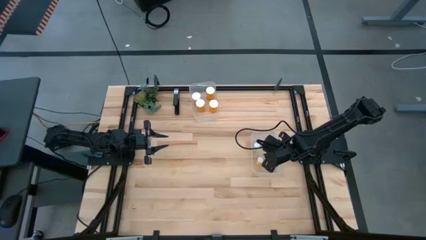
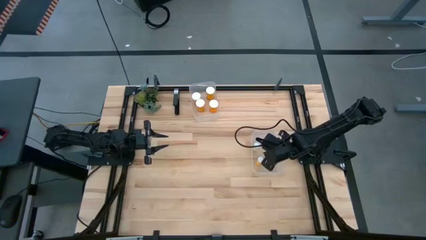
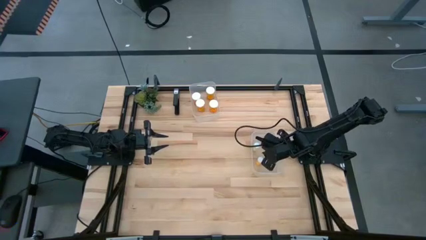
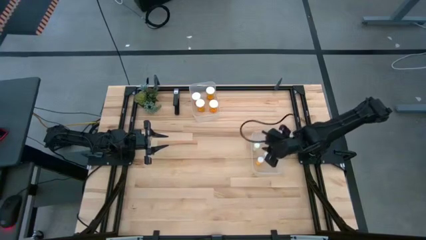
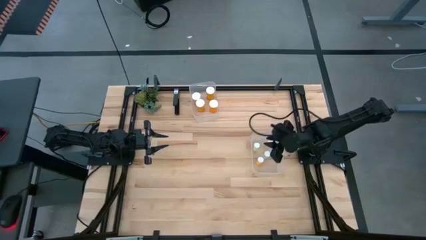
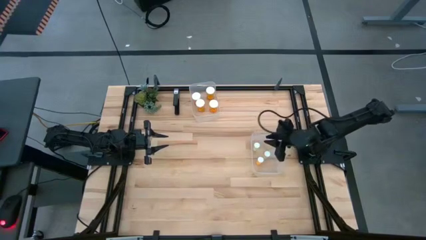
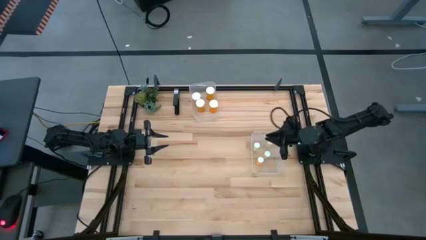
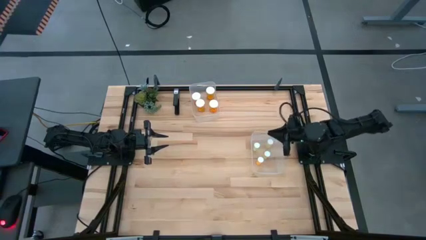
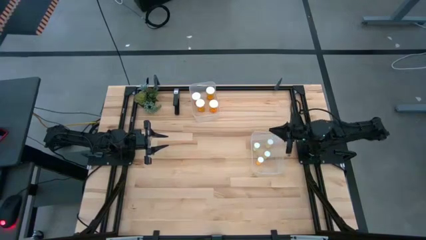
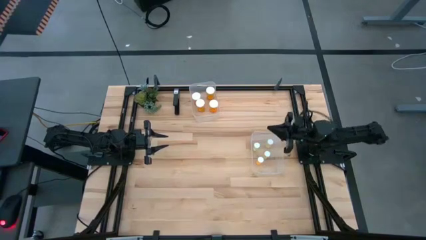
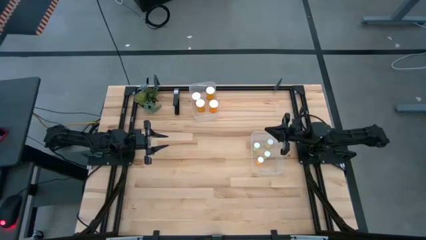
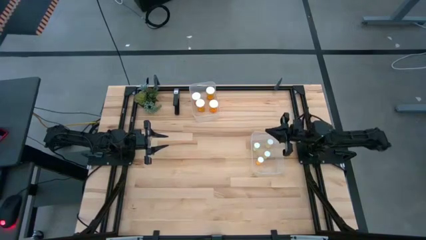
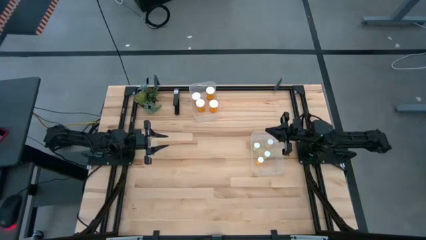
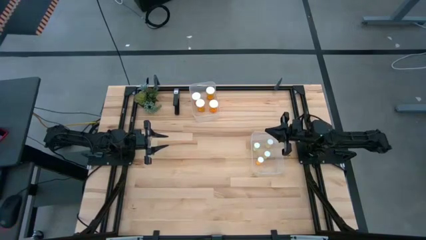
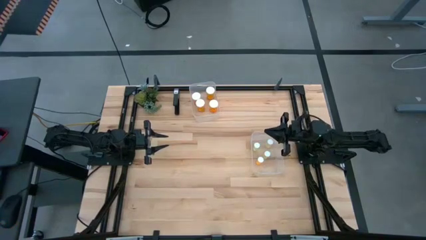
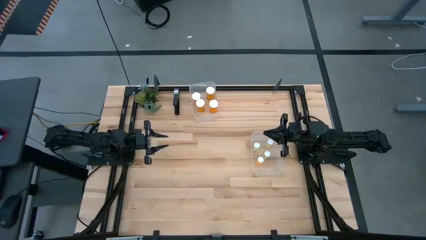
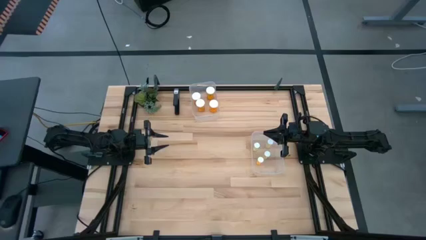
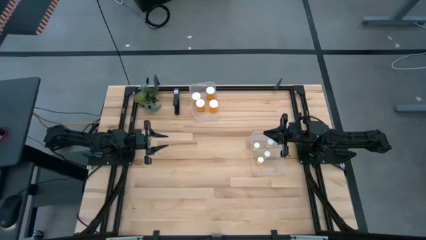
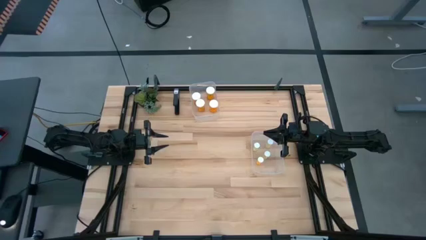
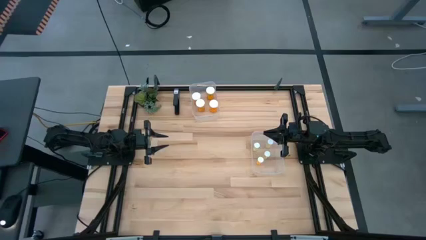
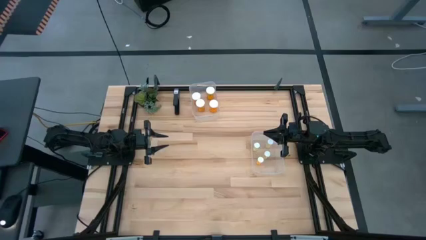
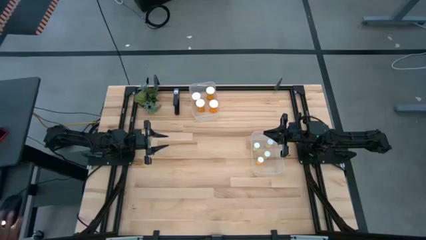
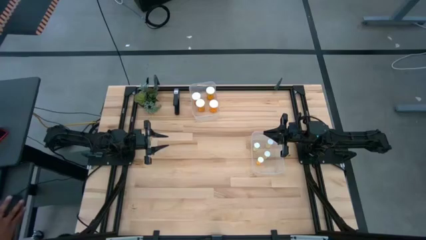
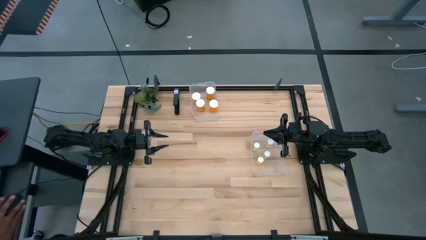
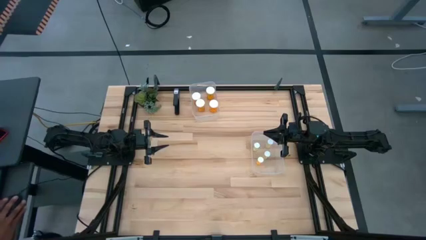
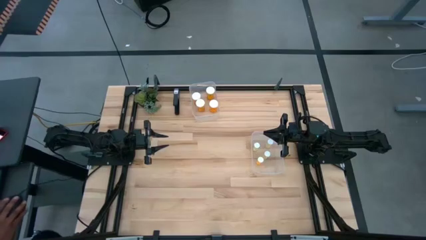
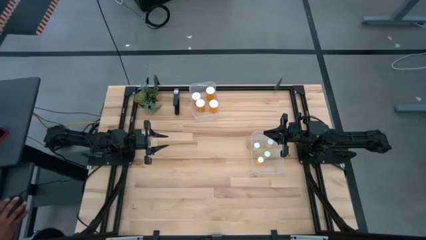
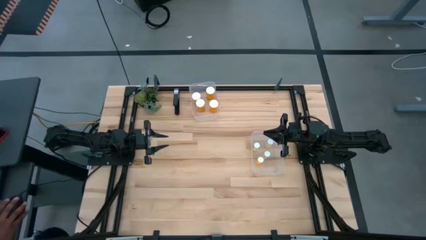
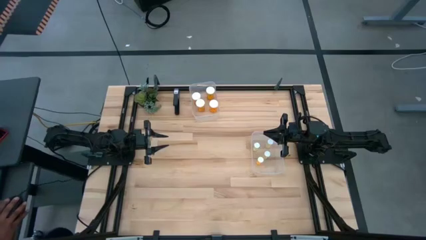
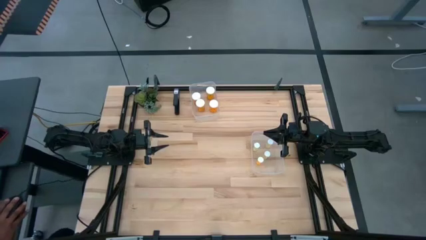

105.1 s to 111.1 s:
Task: Pick and place medicine bottles into bin by pill shape (circle, oval)
Return to Home Position

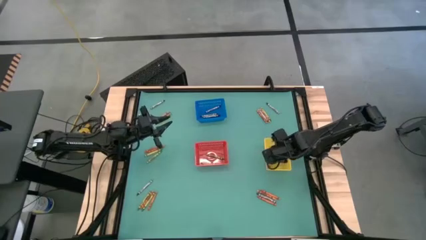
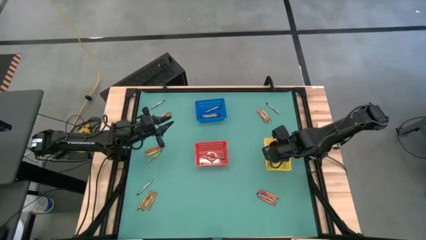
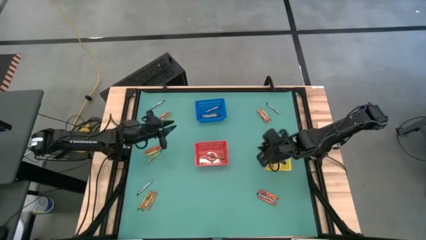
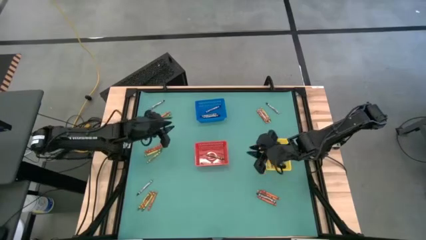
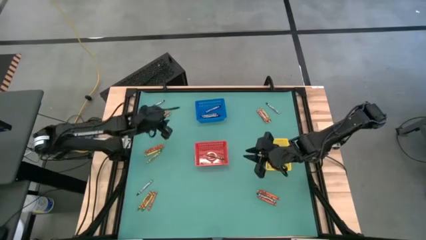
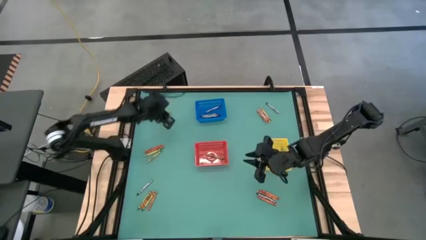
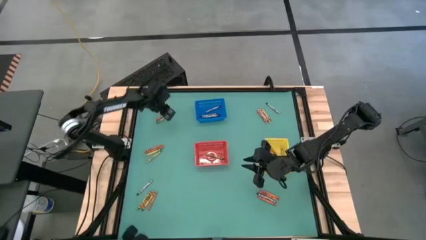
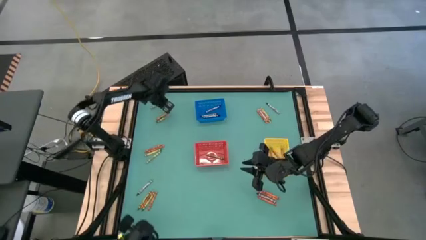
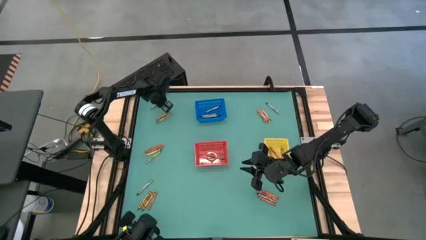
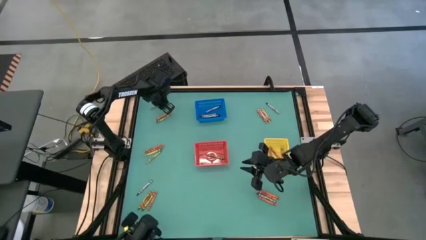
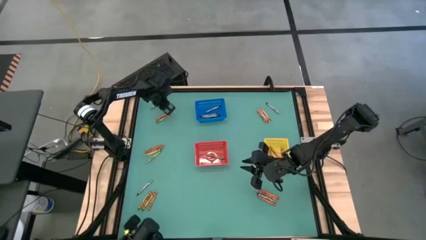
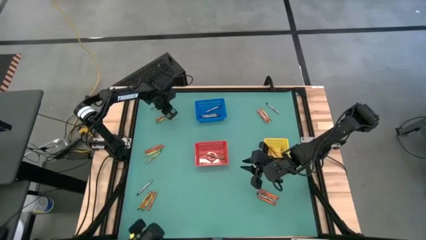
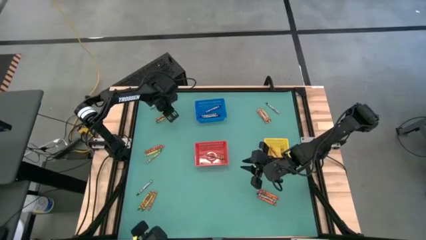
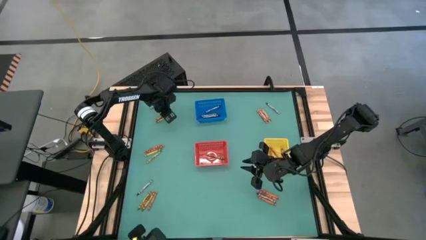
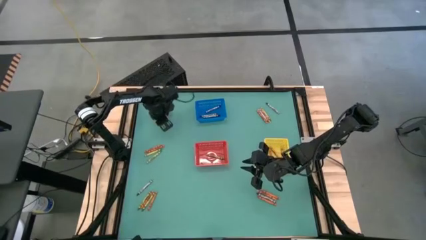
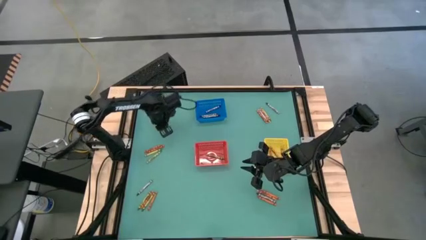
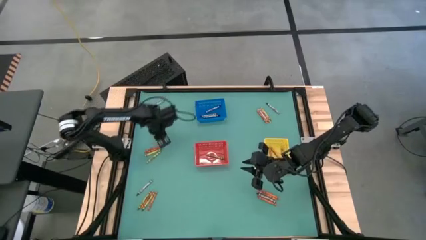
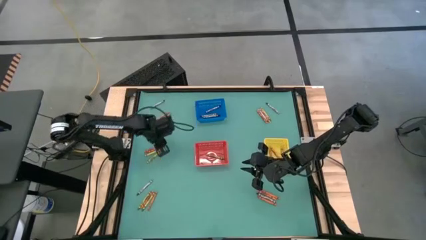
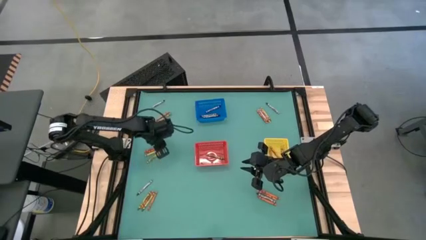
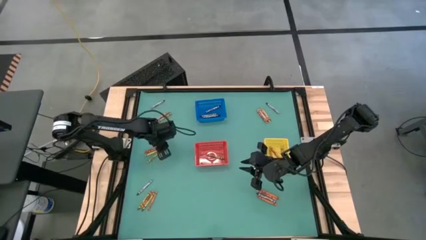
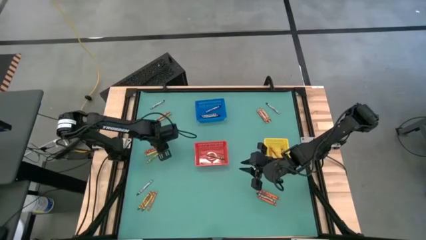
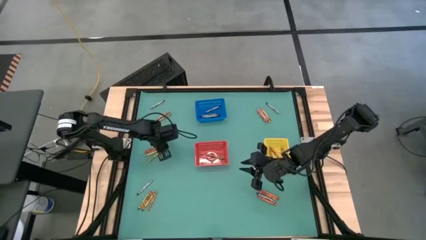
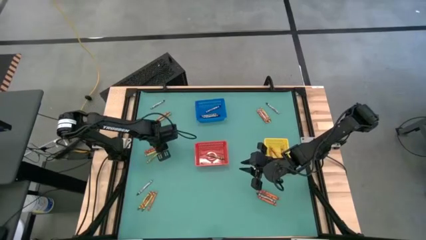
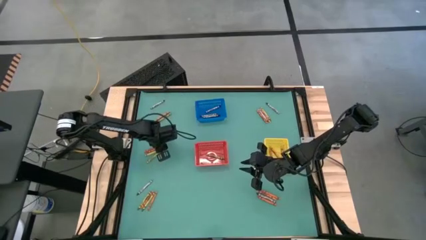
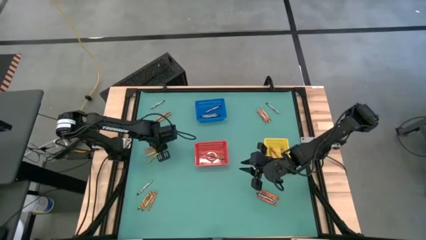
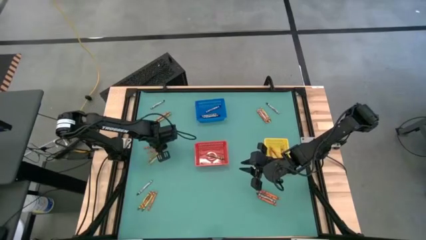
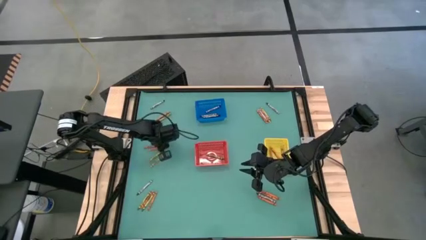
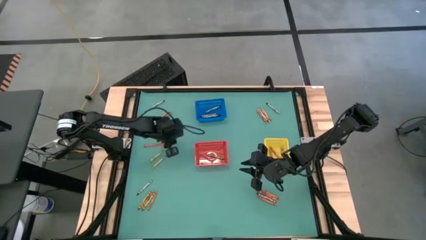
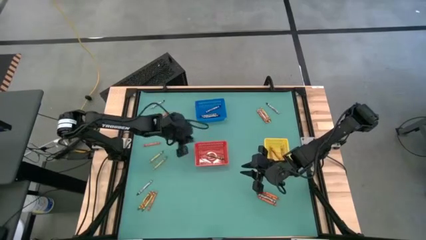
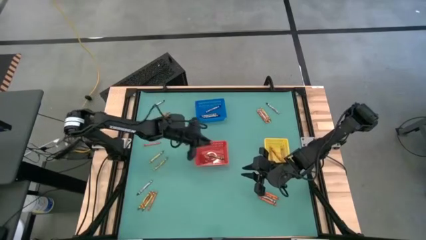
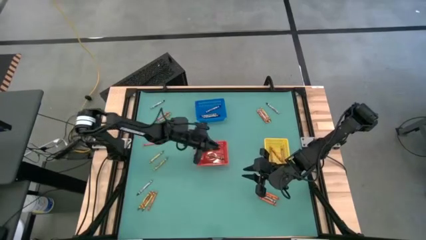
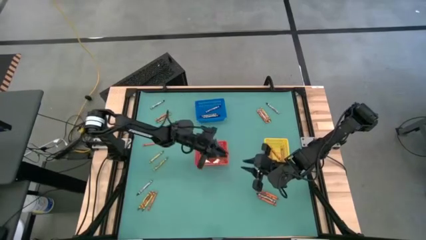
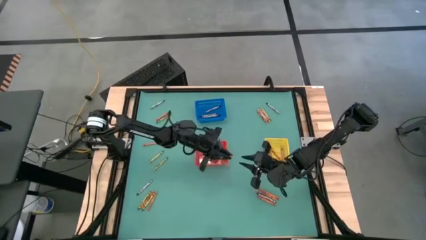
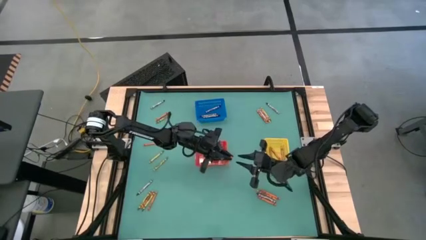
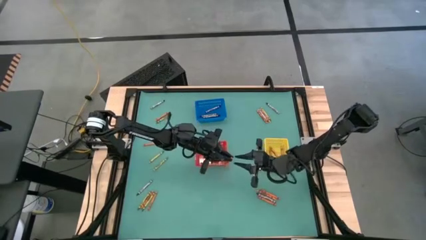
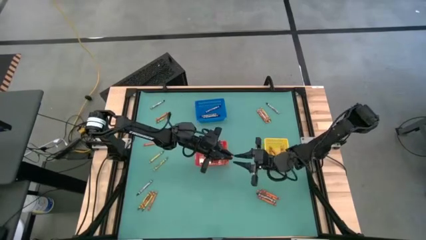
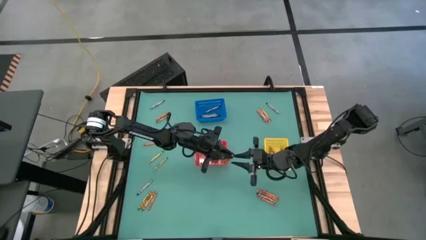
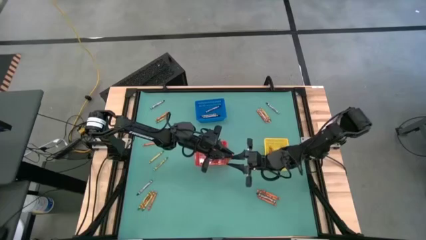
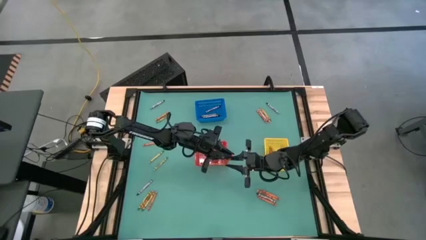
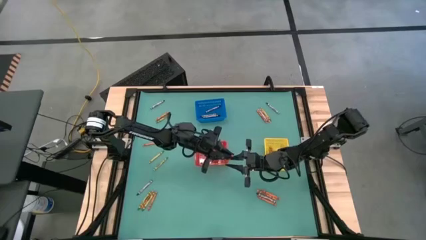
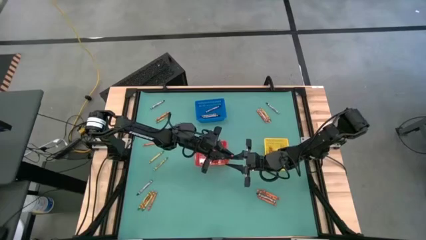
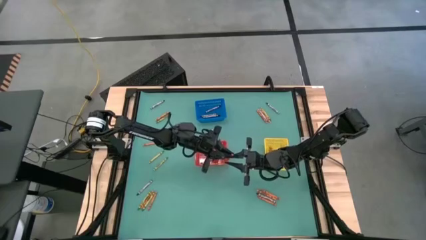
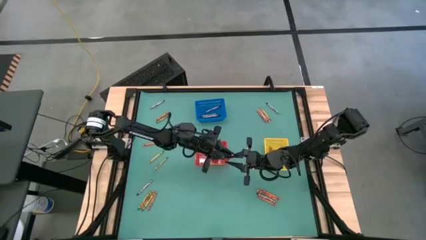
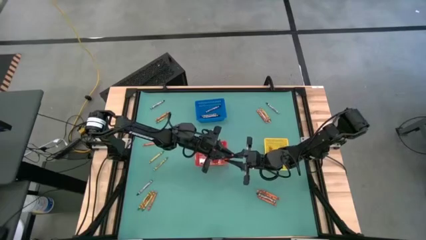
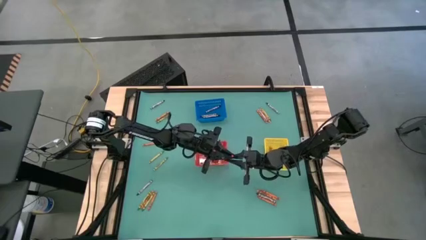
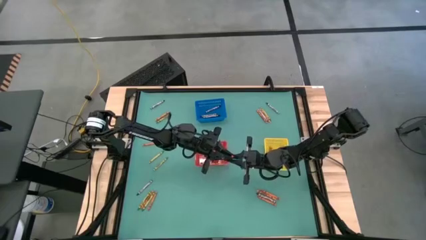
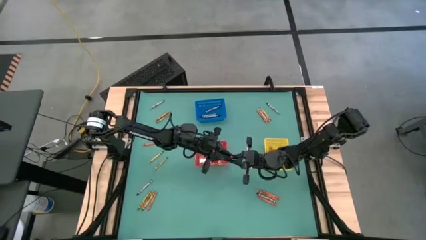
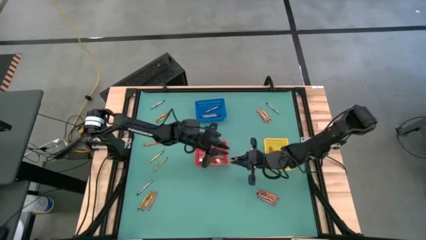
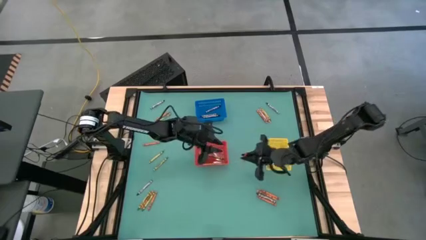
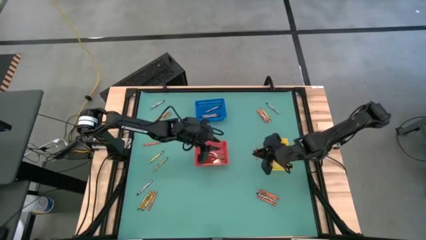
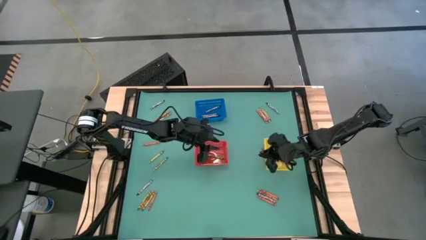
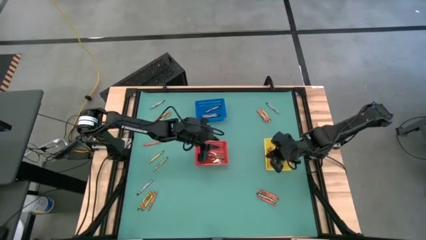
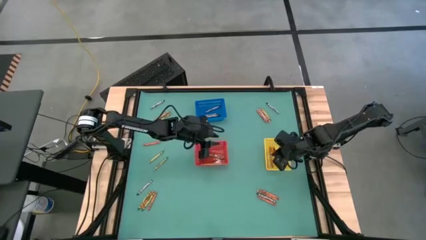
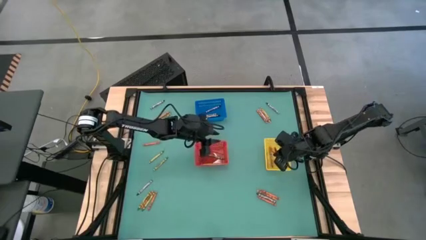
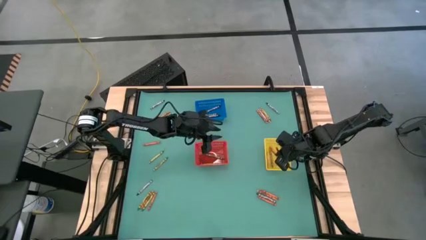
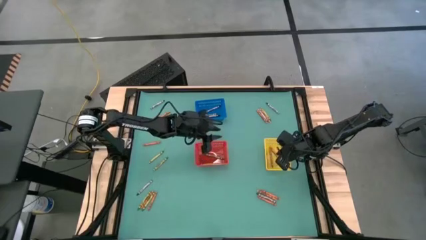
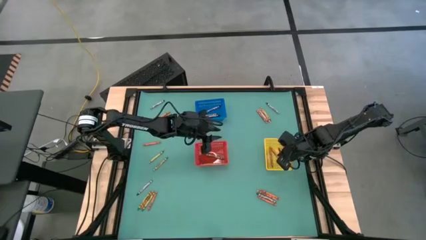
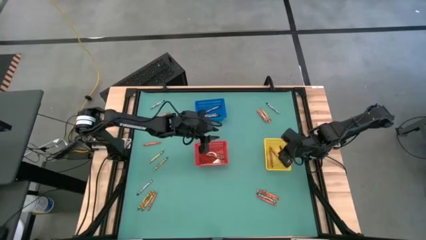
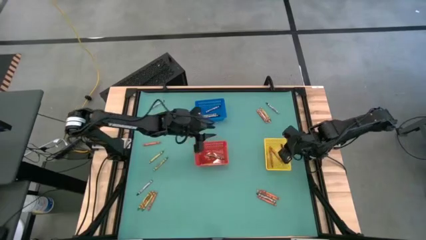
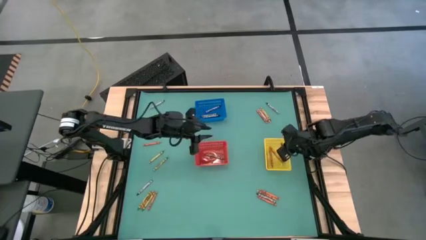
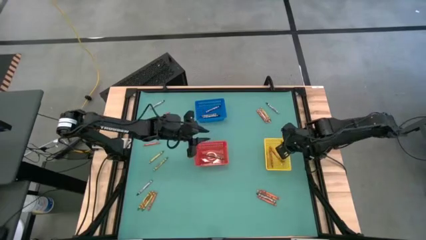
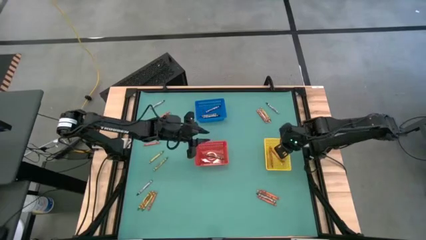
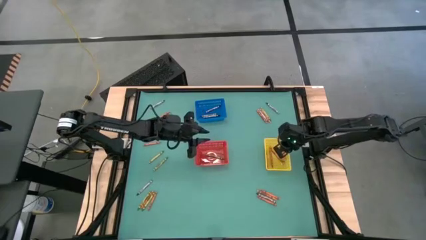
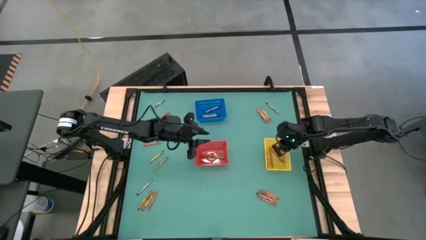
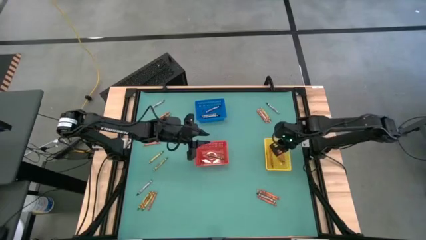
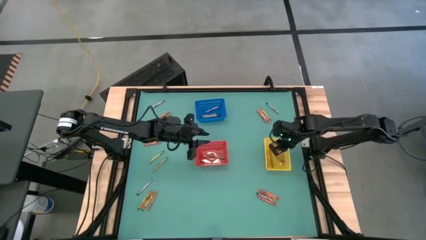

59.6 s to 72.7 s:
Task: Sort crayons
Put the orange crayon into the yellow bin
